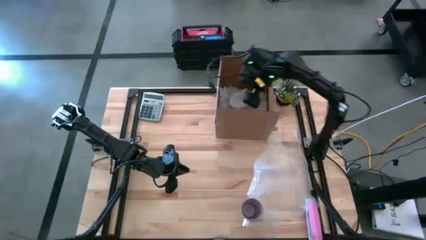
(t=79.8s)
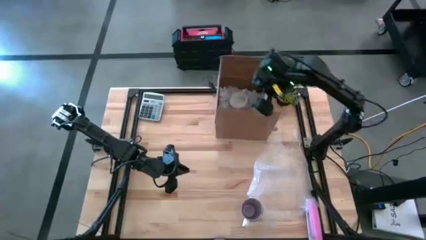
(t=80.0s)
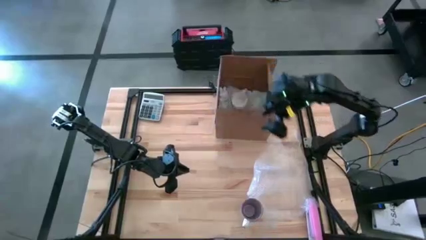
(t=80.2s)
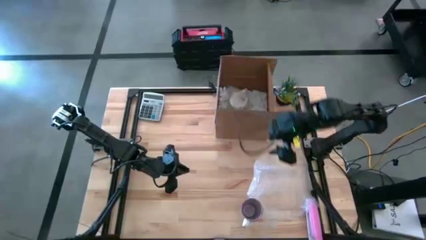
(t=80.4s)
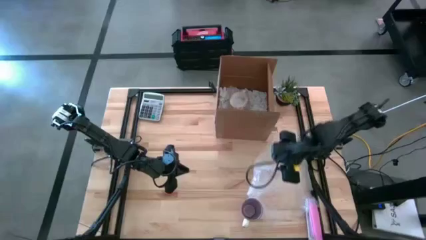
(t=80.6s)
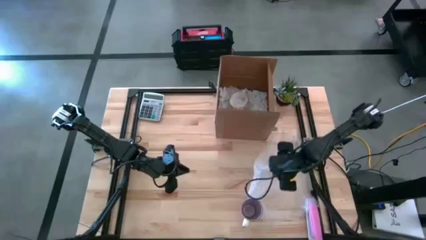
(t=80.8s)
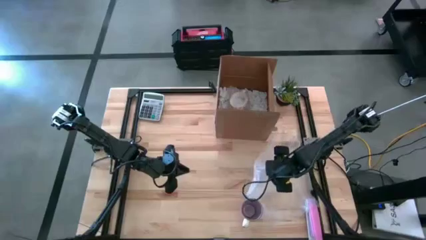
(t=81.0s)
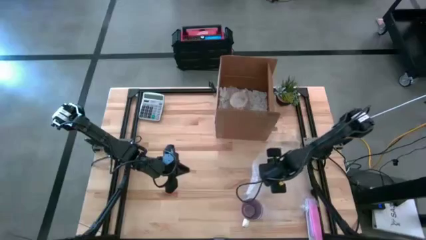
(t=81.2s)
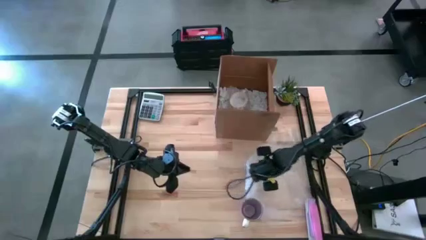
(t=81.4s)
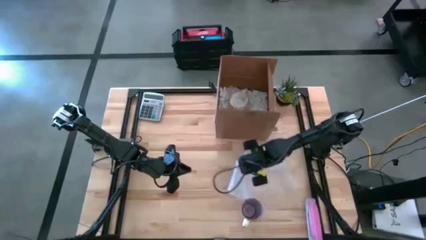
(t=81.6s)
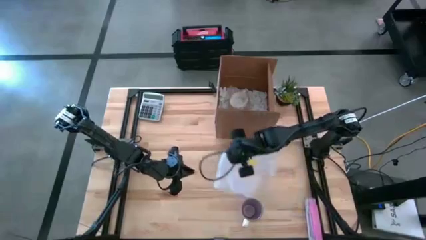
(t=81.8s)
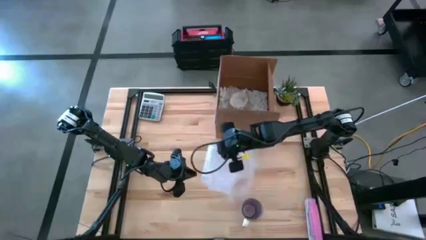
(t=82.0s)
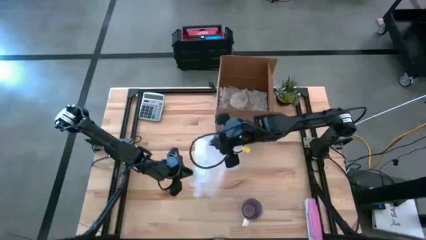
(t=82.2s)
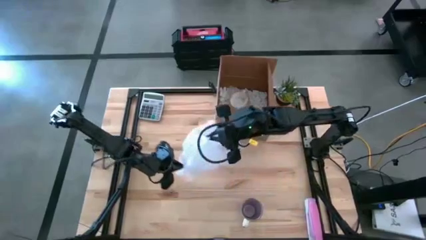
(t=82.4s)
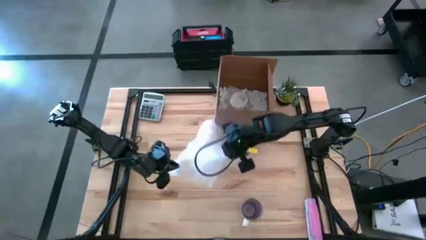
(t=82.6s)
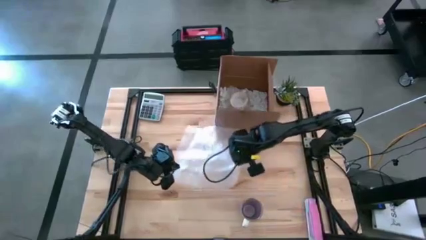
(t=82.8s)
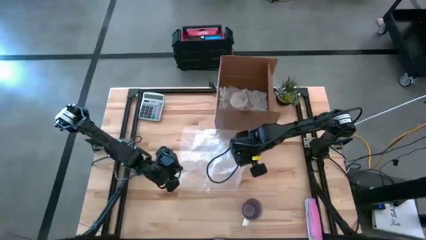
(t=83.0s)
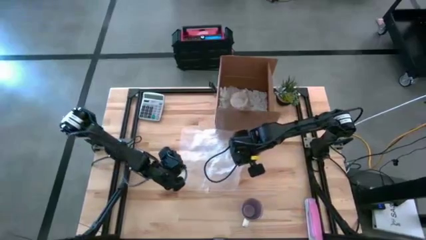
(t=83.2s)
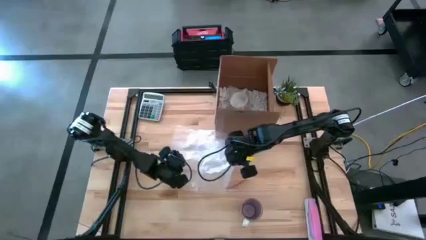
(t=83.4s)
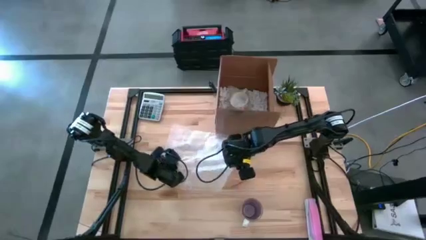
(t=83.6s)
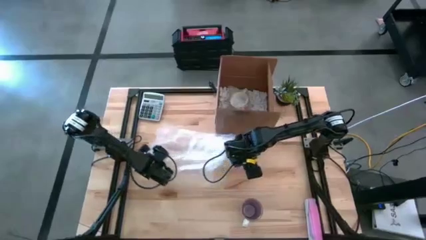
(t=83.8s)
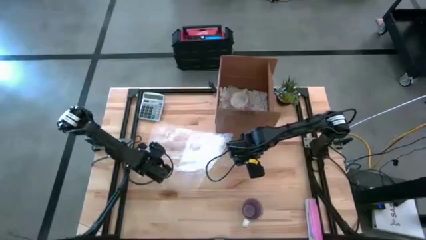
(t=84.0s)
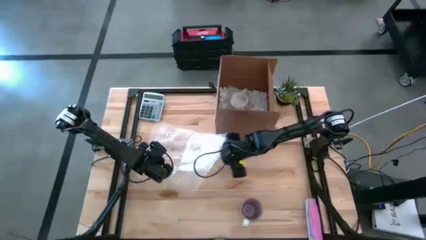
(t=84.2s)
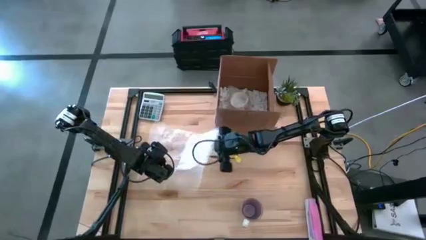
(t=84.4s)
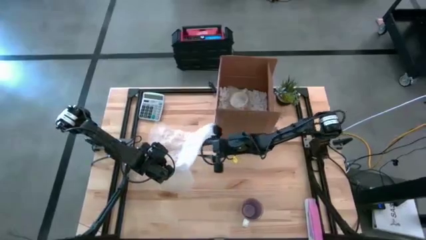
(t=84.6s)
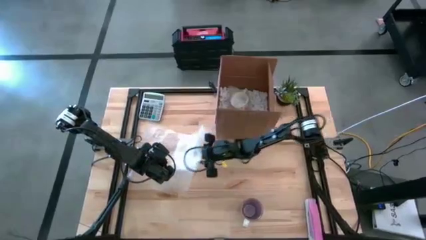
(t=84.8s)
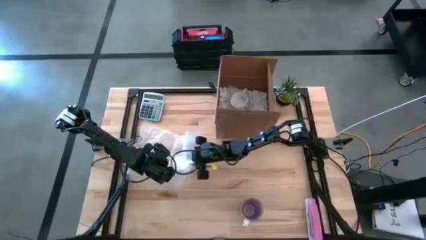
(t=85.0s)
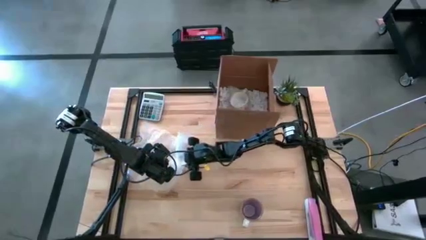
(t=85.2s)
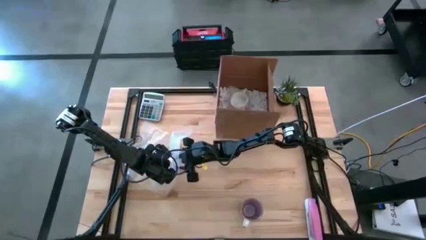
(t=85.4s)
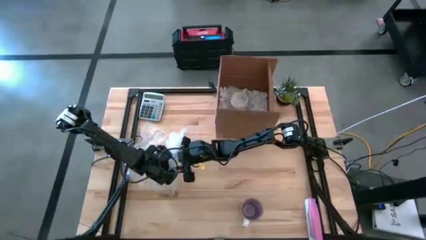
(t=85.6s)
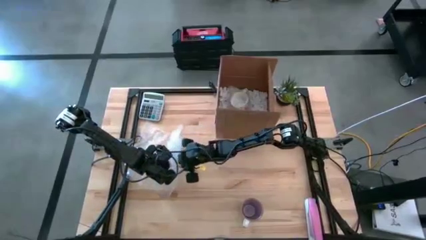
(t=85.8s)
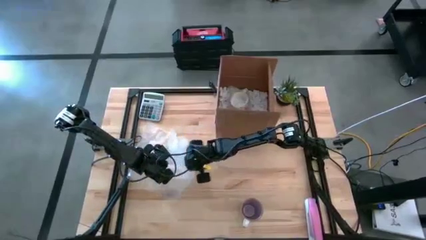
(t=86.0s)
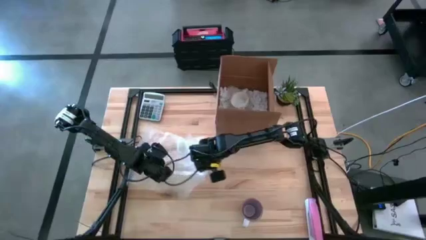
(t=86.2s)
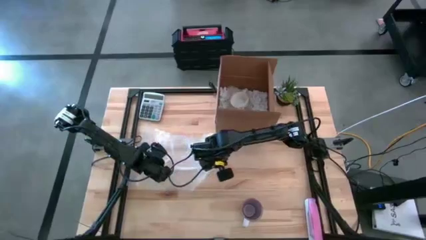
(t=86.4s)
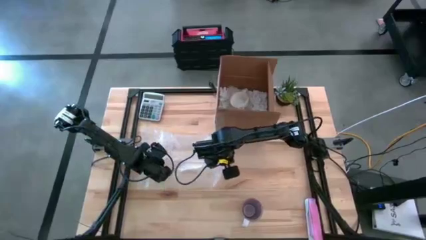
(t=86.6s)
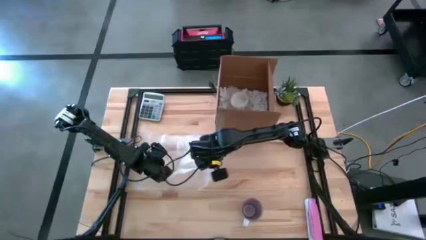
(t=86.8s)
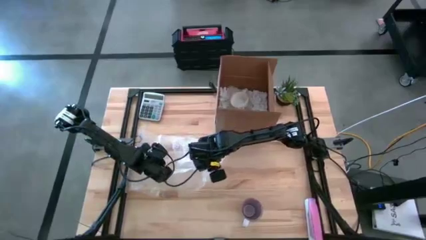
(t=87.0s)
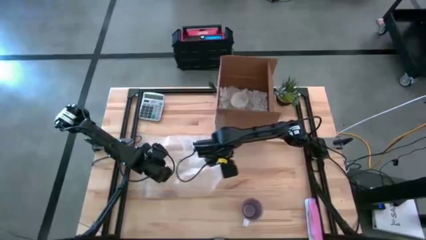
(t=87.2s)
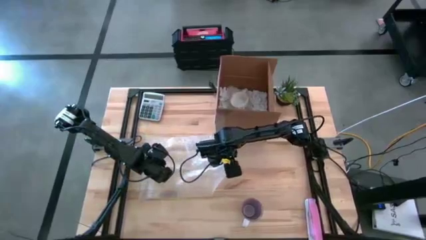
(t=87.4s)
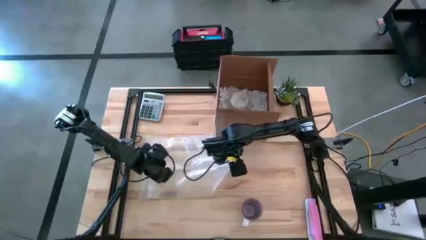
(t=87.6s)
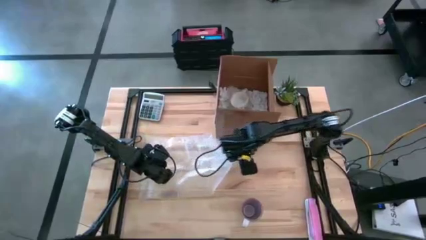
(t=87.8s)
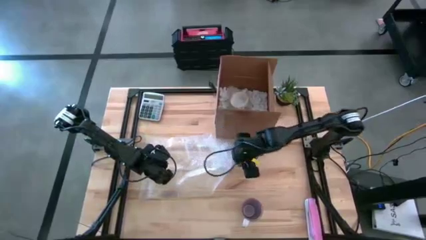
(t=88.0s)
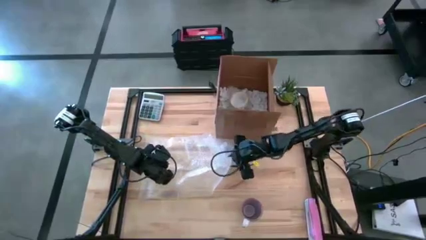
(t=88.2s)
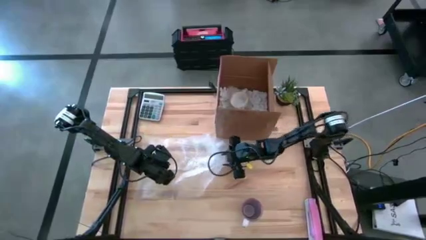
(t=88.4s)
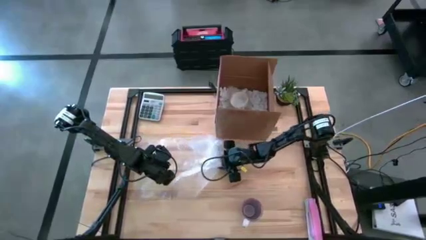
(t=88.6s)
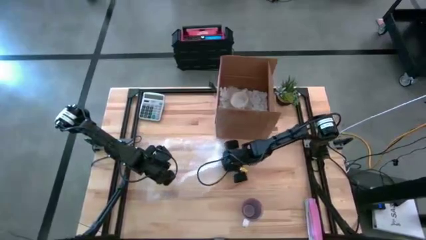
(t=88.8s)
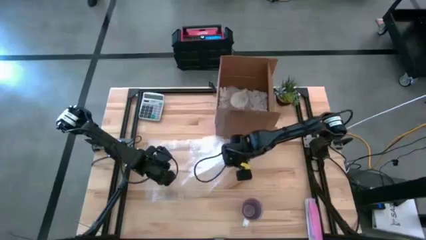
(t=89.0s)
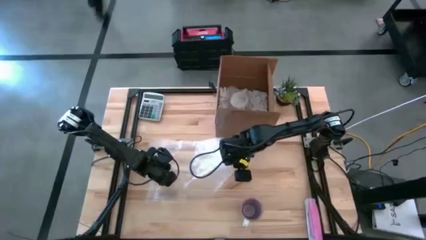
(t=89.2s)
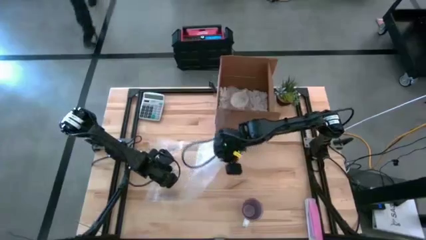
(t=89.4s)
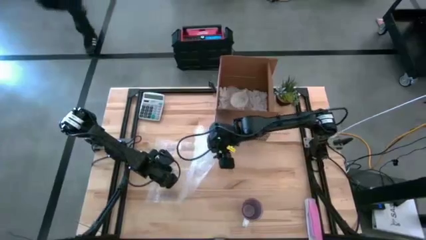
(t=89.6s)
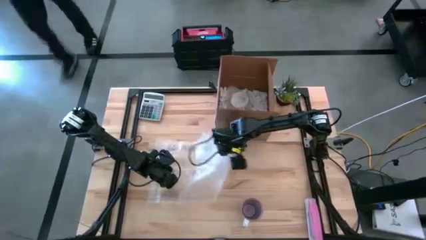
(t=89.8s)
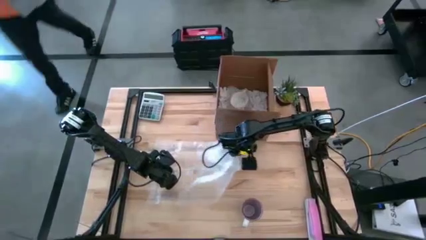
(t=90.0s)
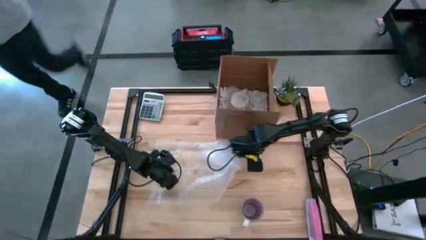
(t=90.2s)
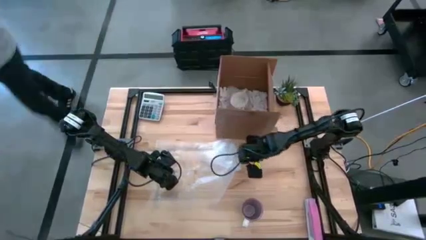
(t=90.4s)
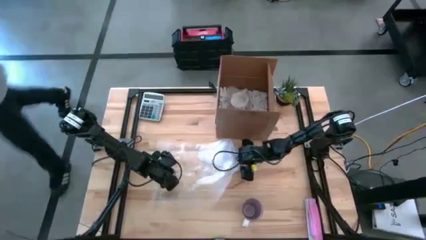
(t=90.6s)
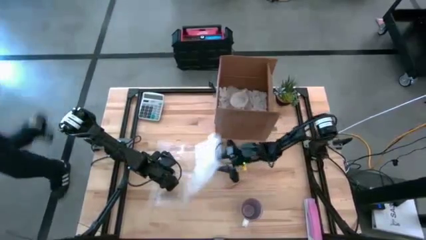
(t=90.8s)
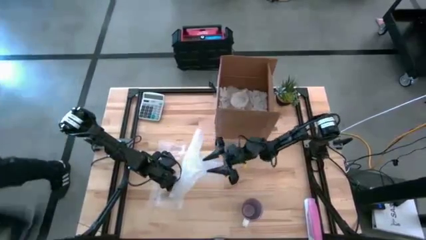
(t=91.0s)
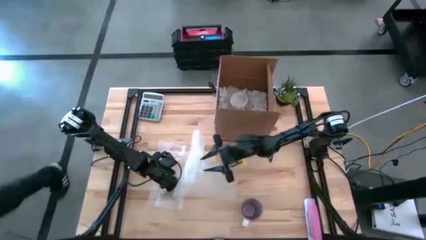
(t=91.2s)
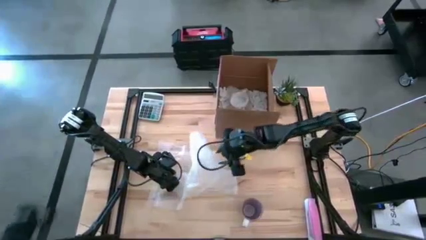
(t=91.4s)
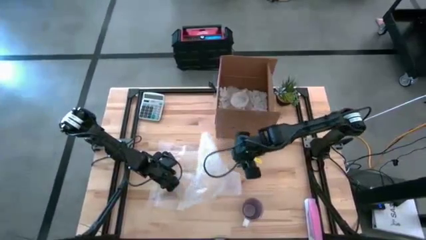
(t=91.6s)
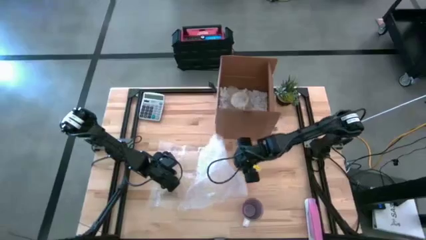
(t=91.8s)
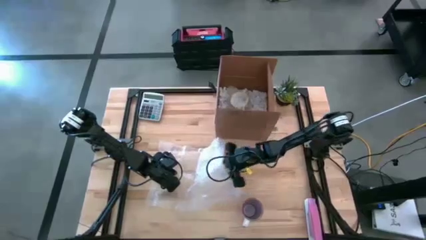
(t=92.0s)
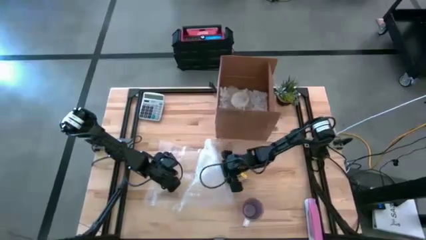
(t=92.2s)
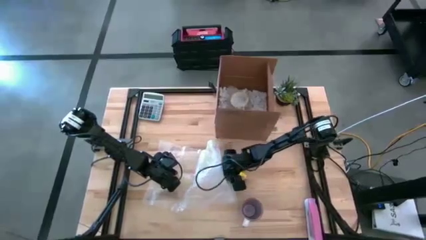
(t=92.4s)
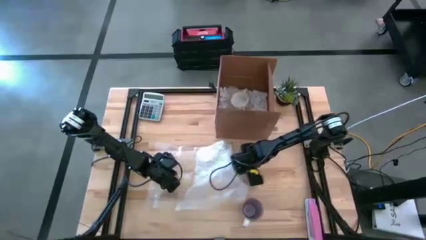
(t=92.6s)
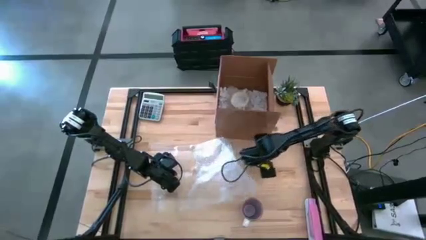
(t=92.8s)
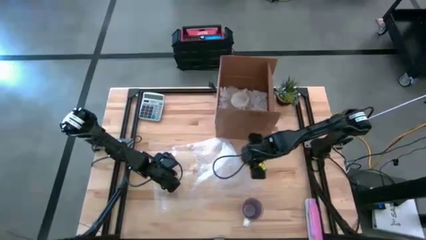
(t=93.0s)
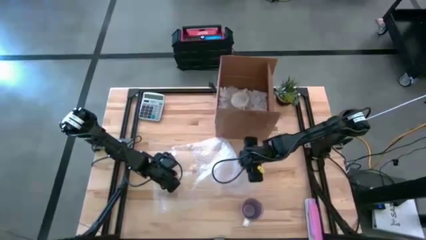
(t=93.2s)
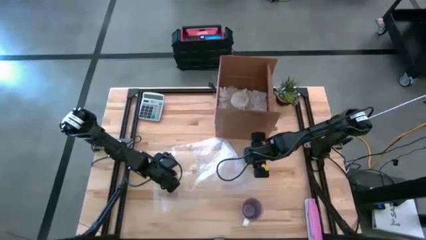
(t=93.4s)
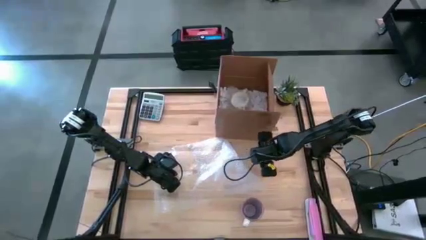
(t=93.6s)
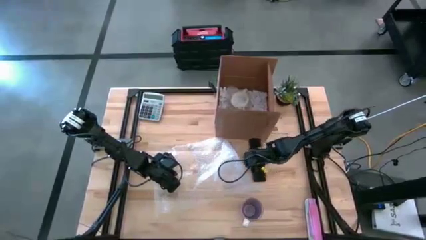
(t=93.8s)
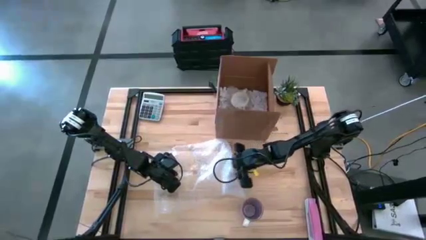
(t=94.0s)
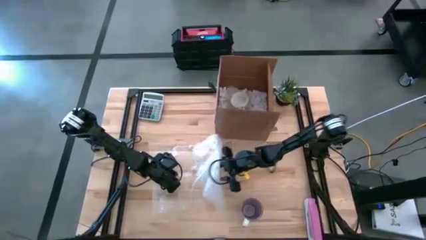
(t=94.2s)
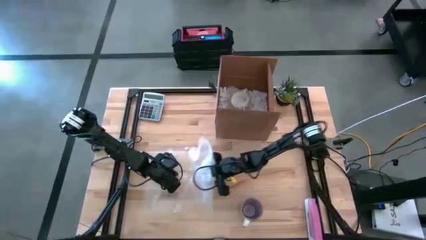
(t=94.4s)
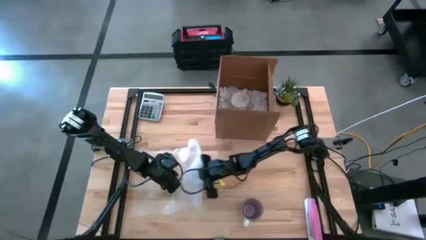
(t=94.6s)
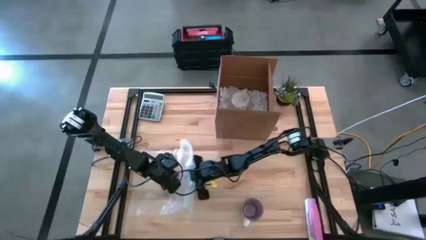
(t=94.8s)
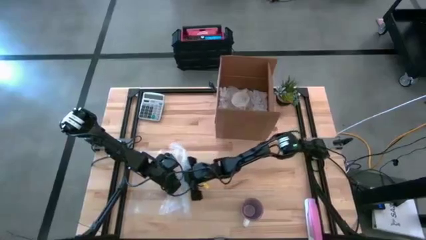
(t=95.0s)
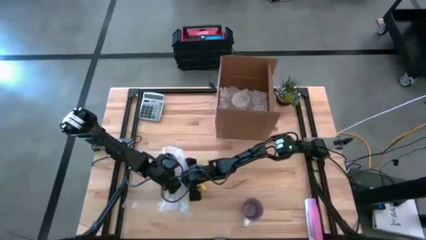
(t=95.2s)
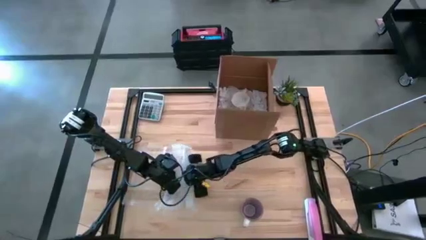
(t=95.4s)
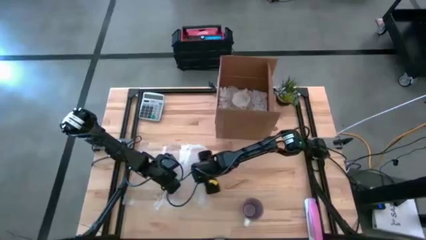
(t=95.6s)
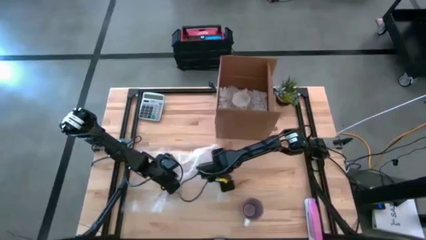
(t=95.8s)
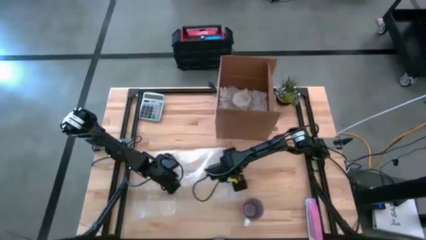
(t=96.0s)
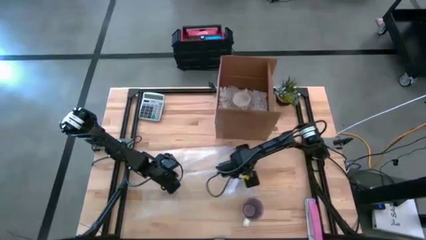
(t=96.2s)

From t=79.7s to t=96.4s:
Task: wrap mug
Prepare the transparent bubble wrap
